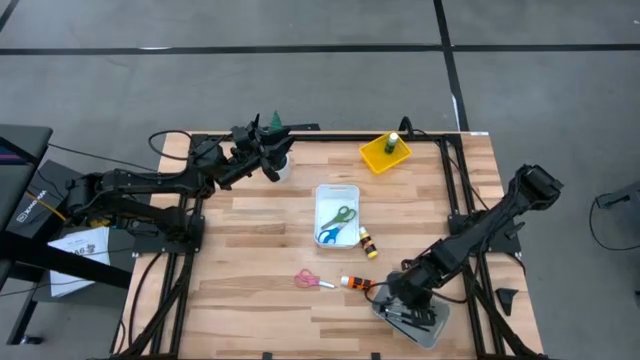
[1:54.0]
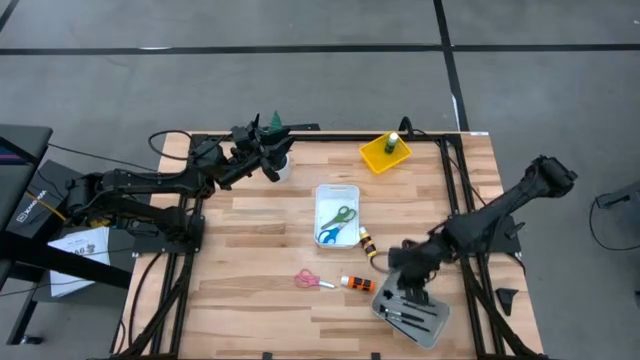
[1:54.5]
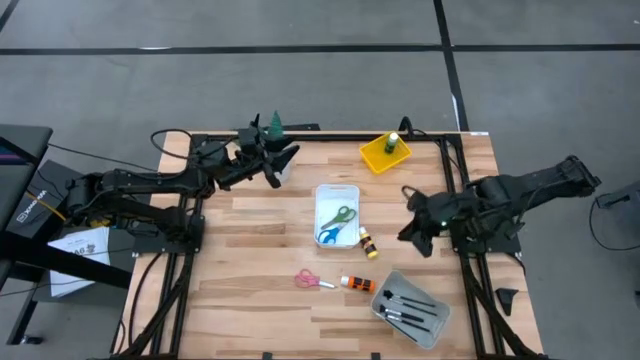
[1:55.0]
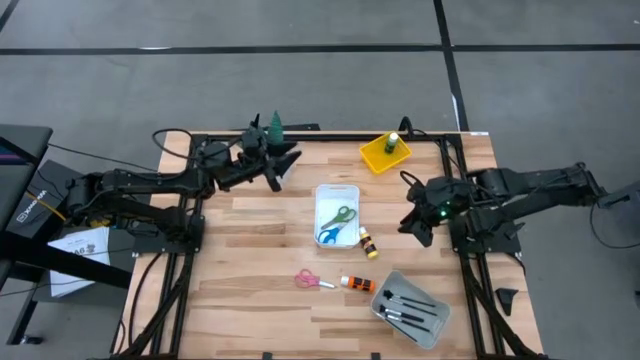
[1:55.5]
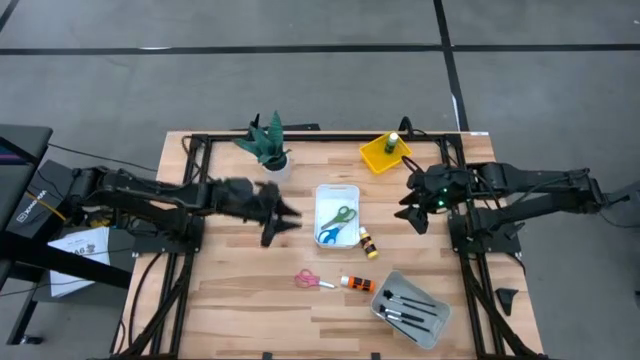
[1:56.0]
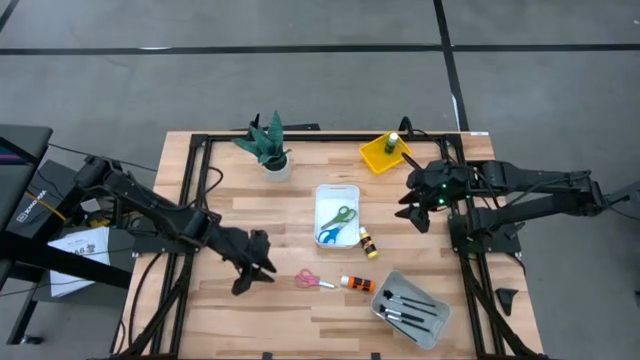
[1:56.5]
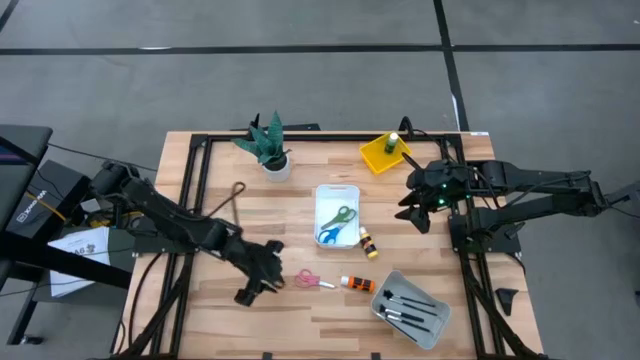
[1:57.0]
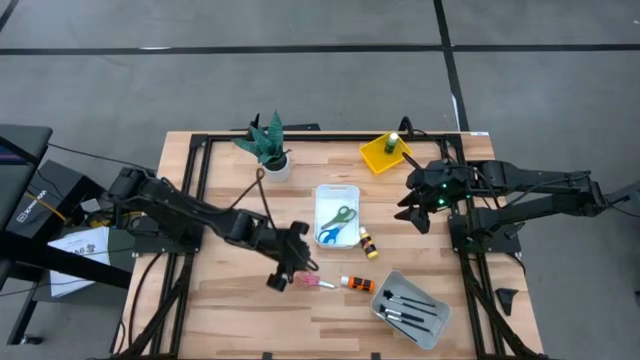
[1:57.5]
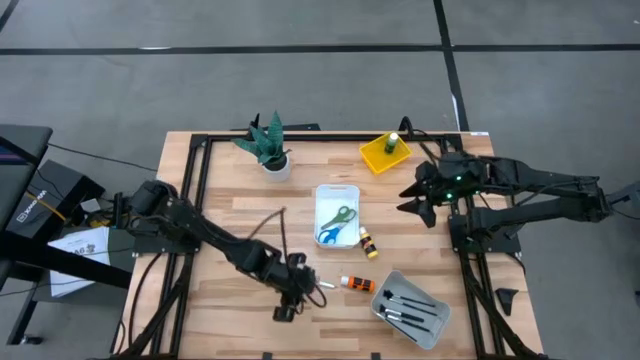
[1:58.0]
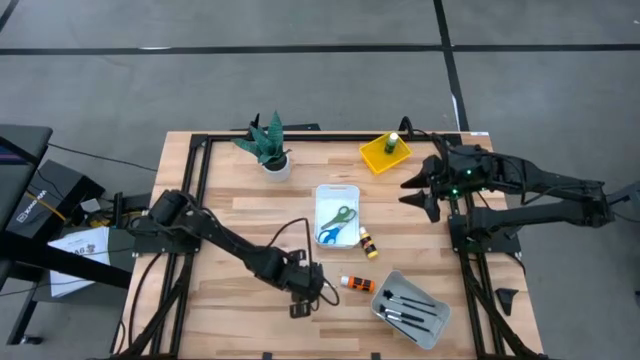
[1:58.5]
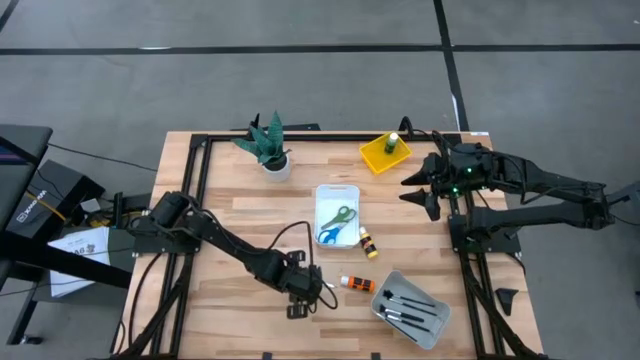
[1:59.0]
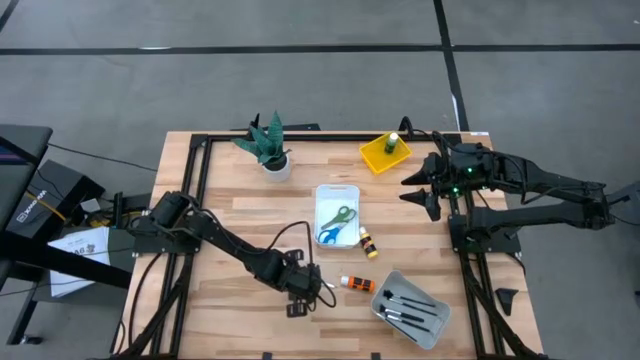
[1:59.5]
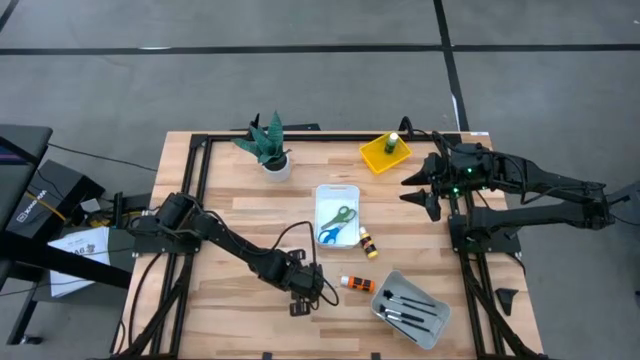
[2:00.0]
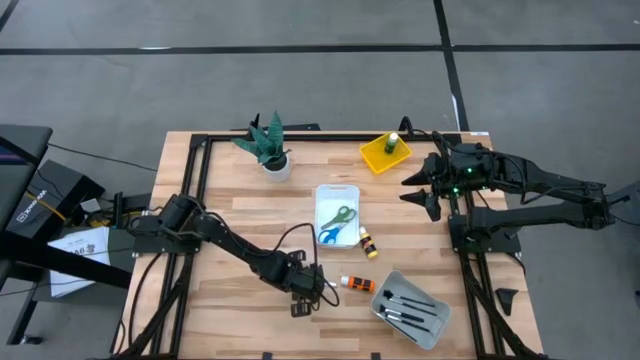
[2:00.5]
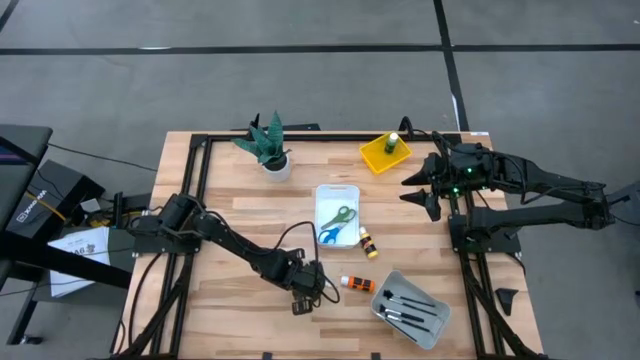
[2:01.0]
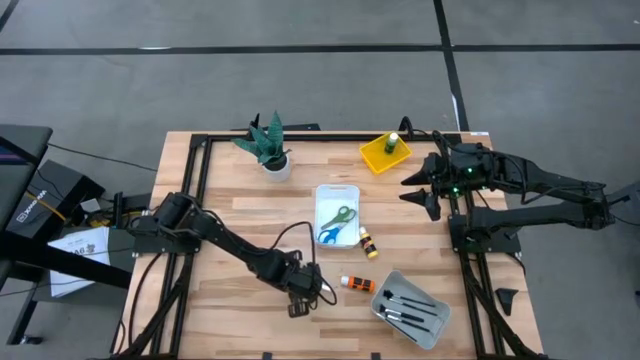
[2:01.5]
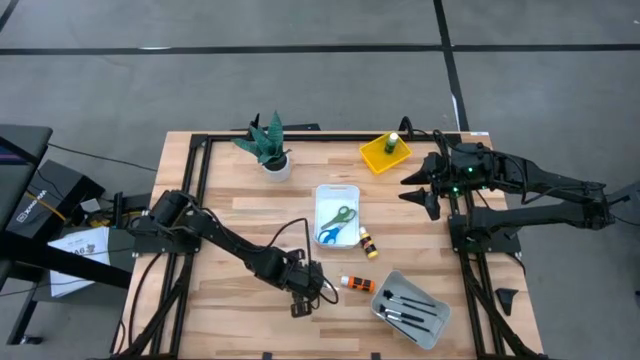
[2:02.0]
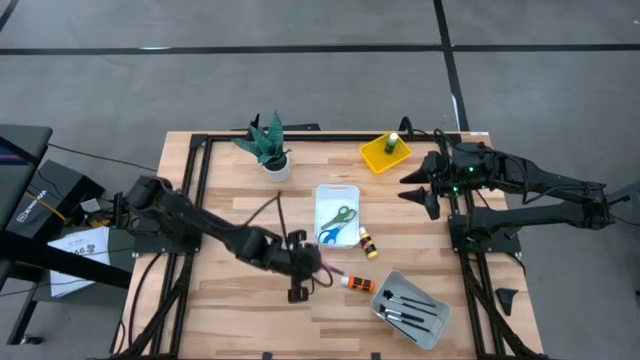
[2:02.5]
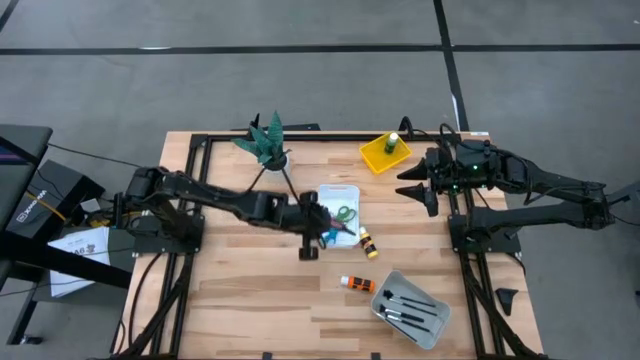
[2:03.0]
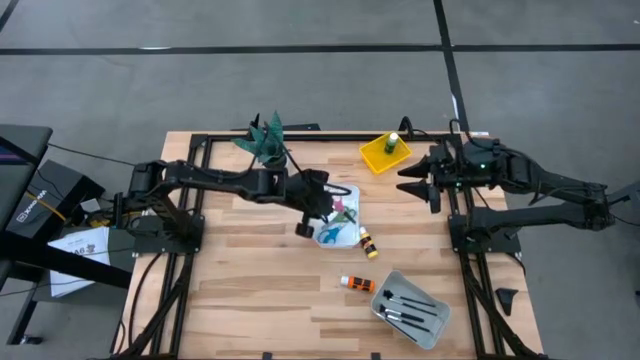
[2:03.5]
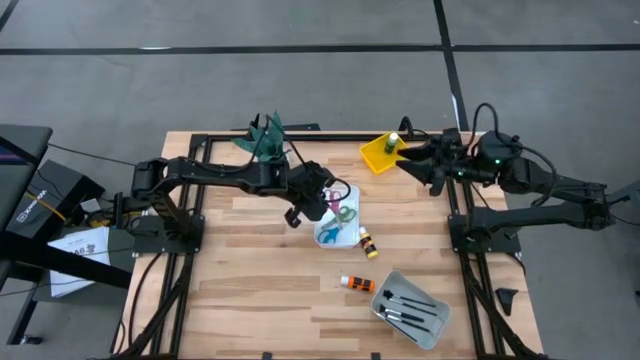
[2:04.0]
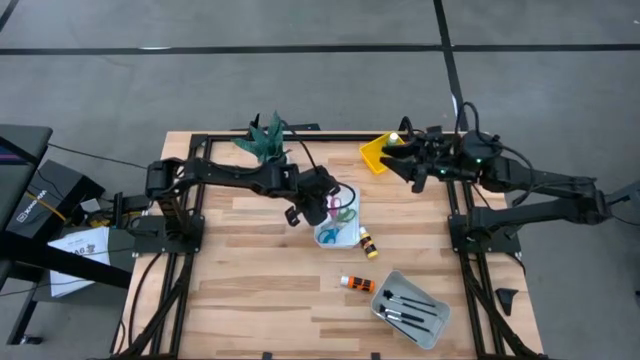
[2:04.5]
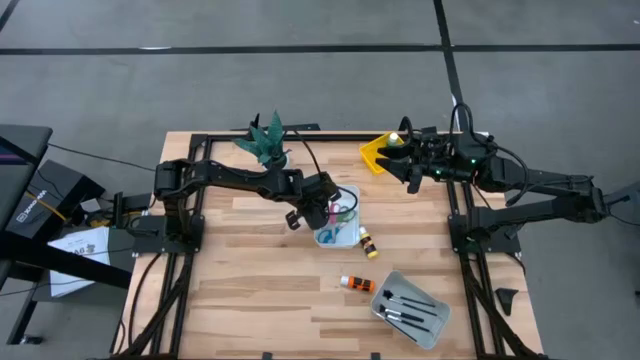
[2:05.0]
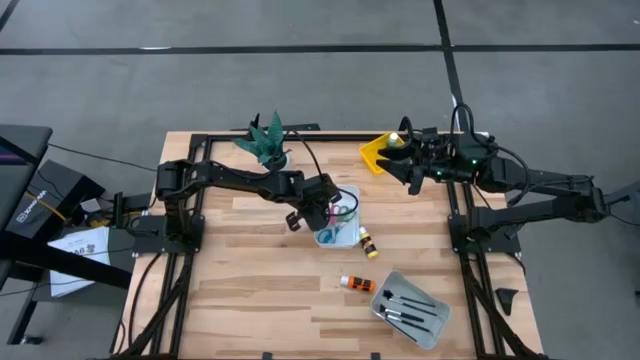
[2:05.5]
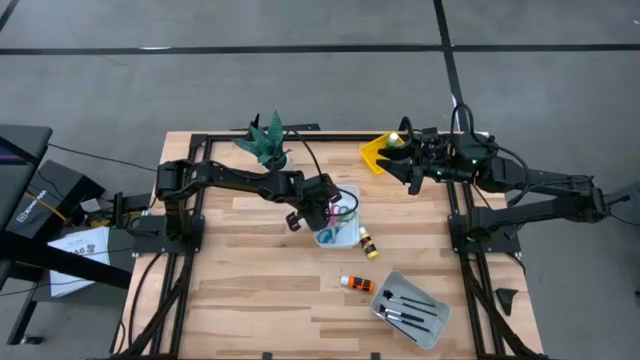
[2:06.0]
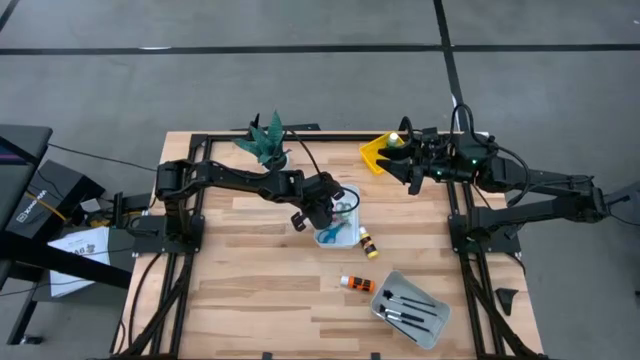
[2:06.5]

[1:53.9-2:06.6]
Task: Pick & Place Paint Supplies
Put the pink scissors into the white bin

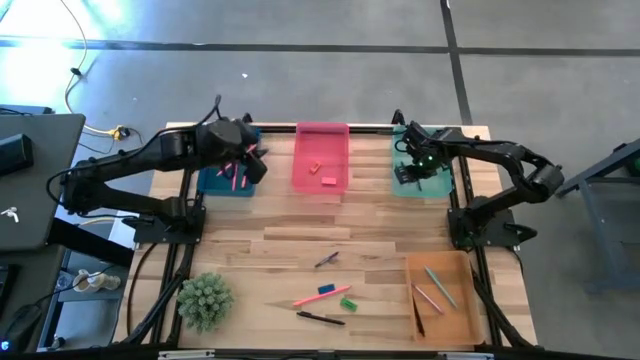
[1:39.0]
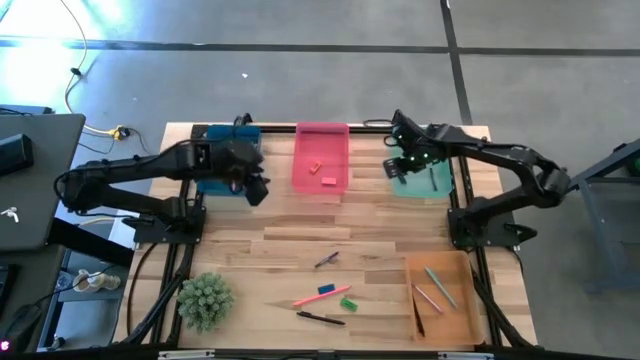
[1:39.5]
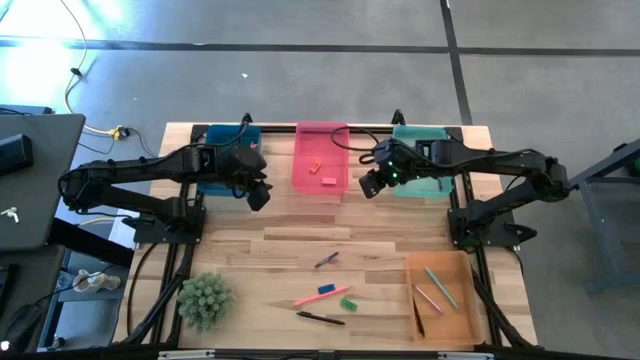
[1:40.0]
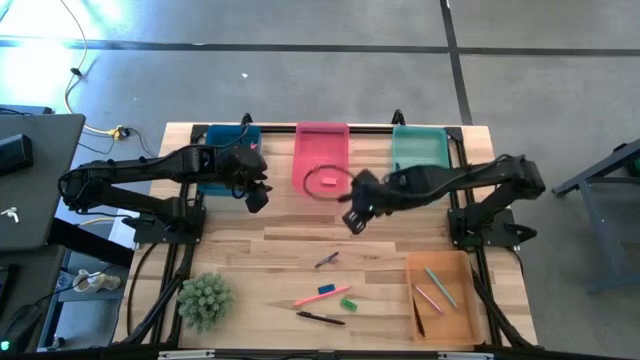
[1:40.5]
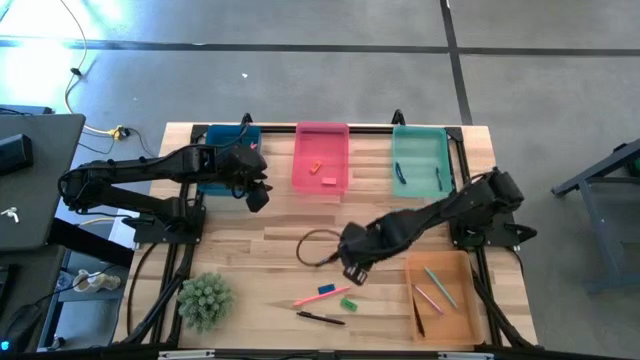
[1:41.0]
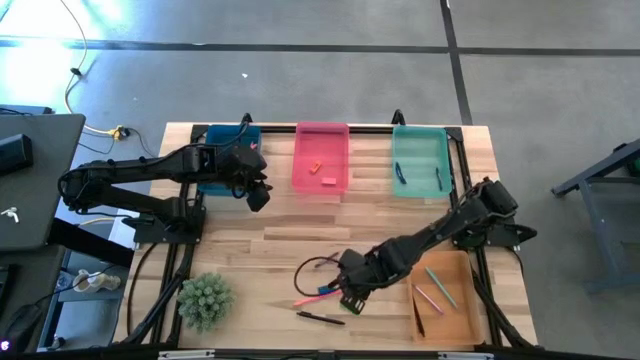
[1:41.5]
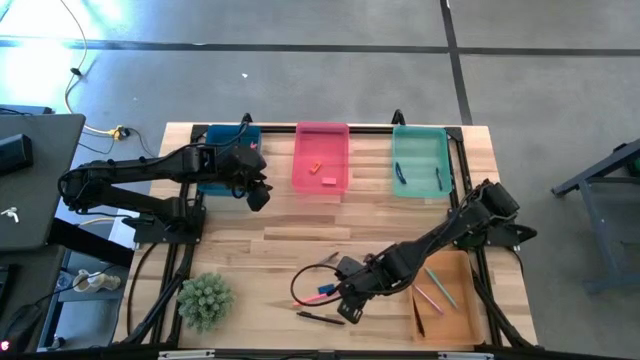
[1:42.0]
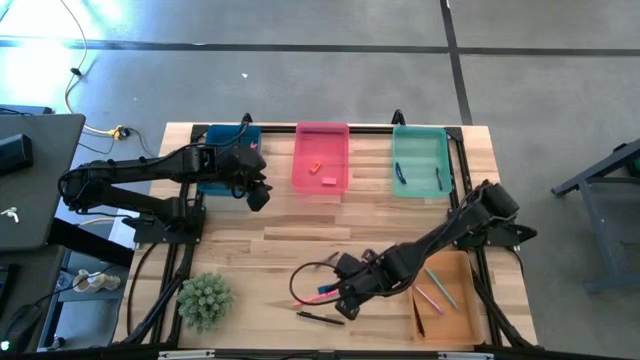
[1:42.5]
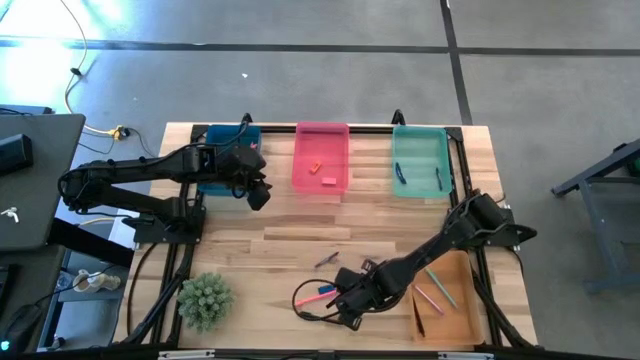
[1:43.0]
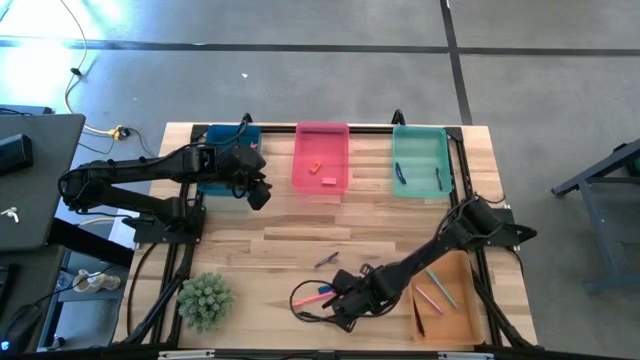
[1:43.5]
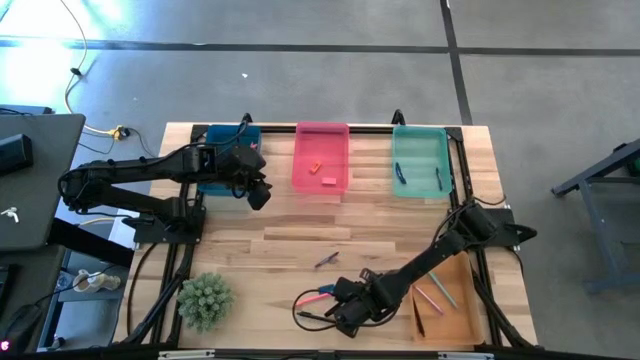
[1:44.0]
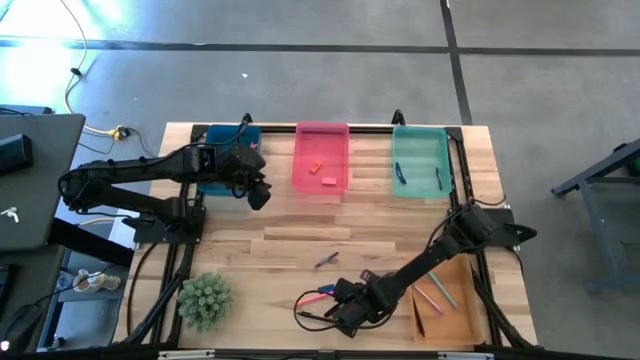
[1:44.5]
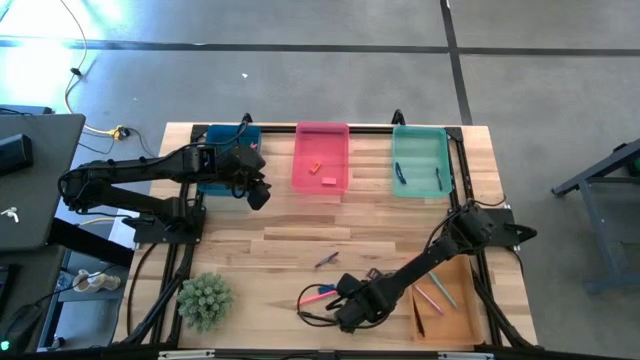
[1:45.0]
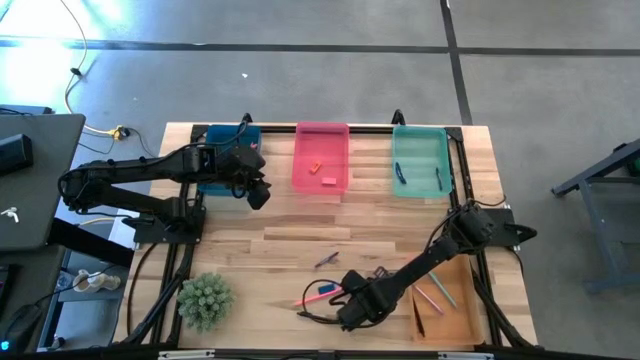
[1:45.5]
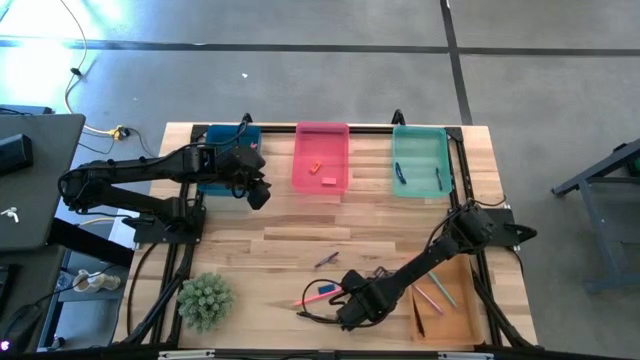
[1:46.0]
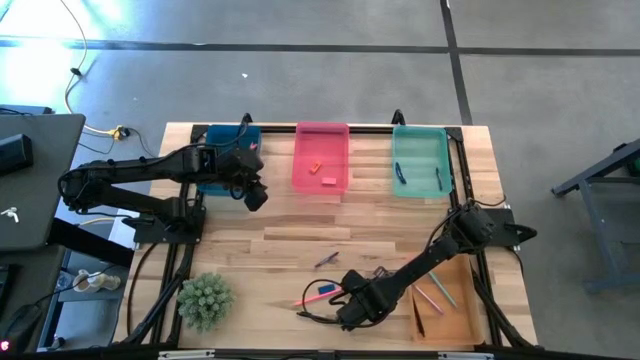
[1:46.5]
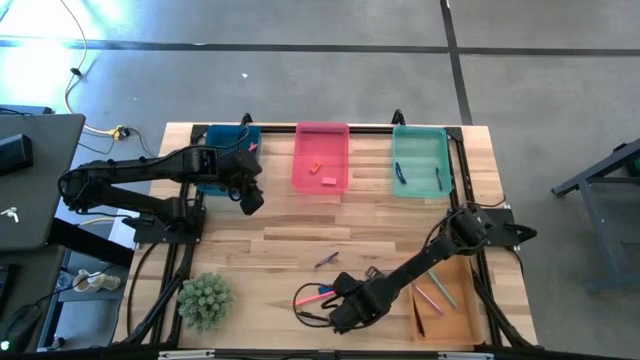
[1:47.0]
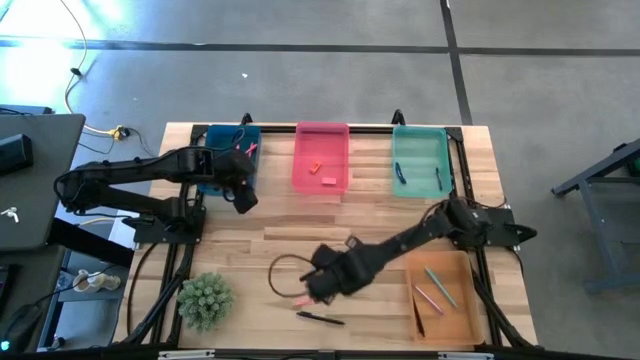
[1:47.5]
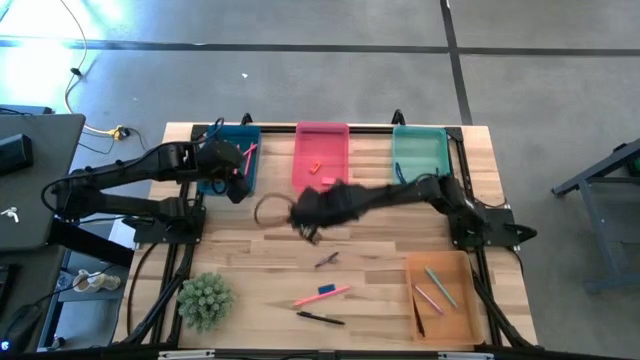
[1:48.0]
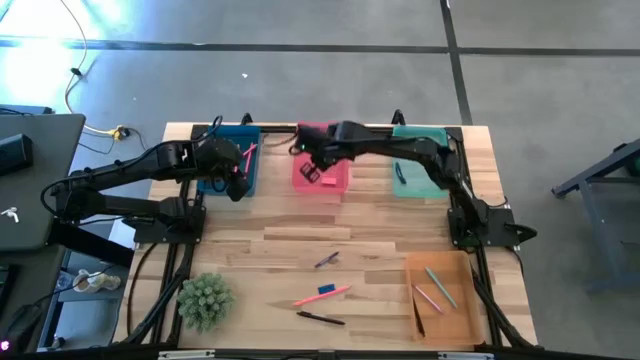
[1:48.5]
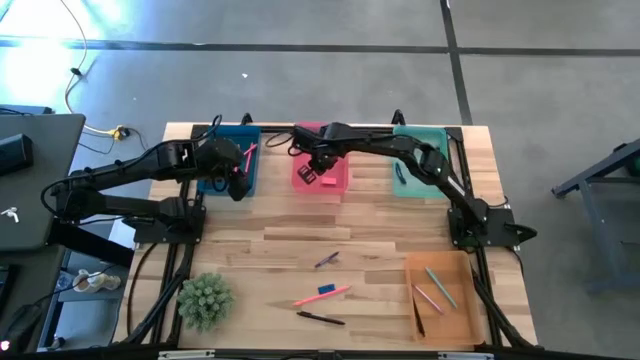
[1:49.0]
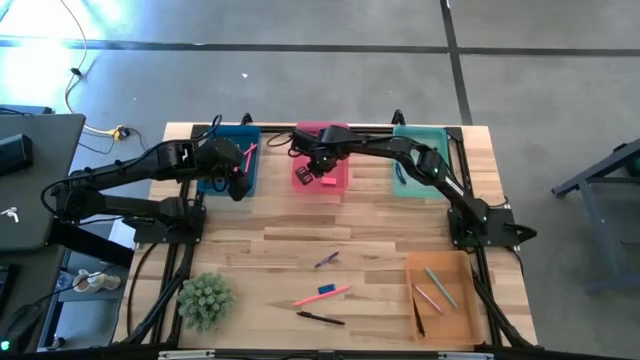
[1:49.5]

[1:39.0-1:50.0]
Task: Sort crayons/erasers/pens/pencils in bins
Put the green eraser into the pink bin
